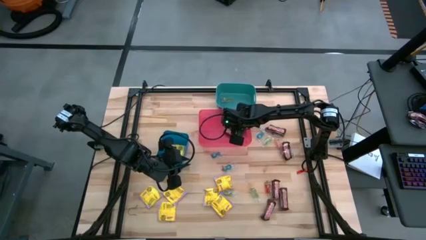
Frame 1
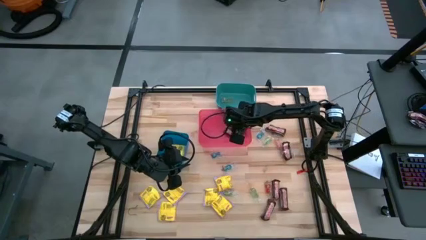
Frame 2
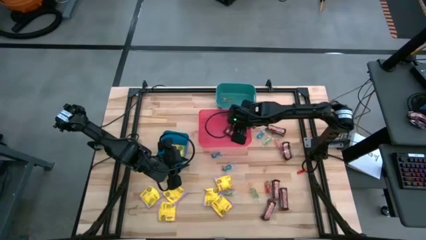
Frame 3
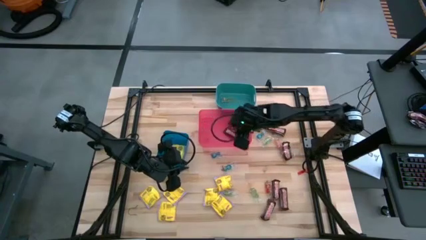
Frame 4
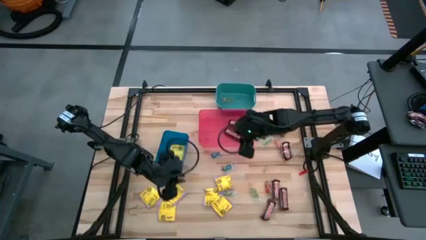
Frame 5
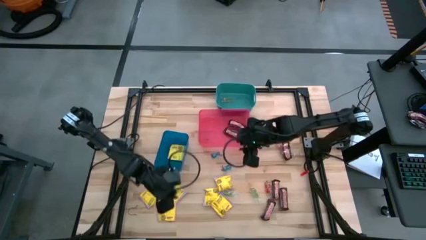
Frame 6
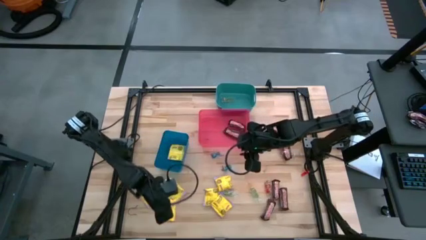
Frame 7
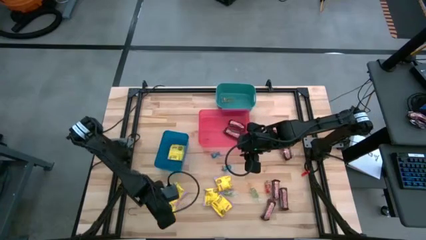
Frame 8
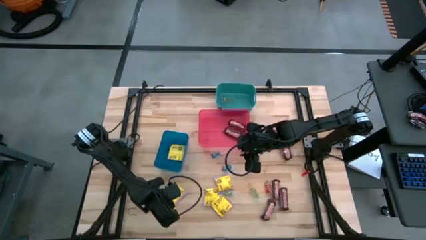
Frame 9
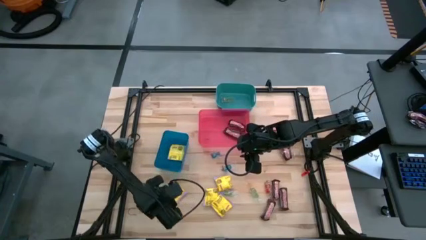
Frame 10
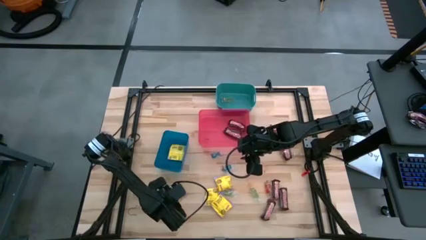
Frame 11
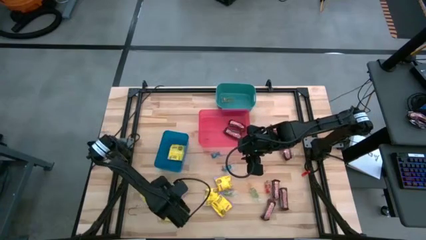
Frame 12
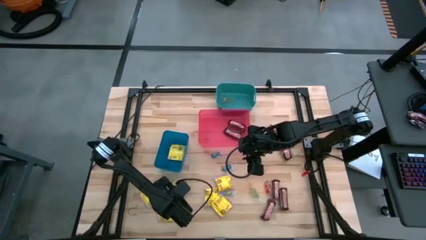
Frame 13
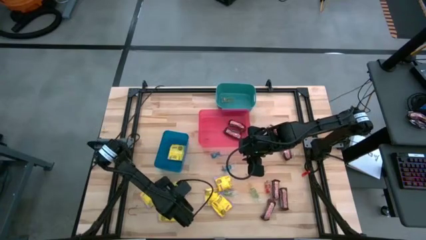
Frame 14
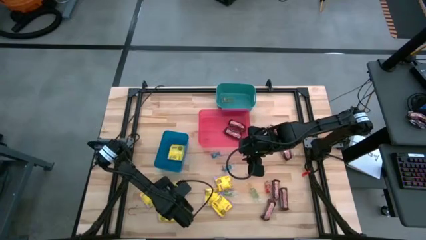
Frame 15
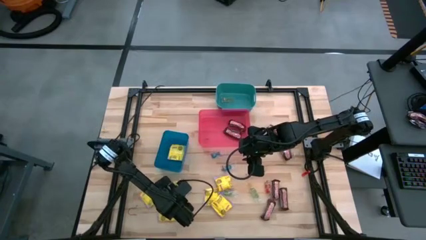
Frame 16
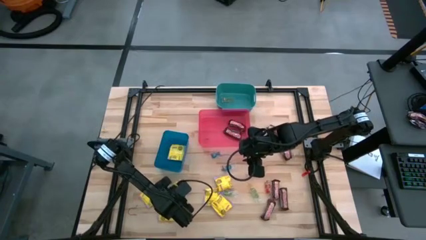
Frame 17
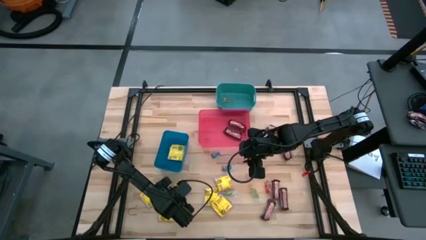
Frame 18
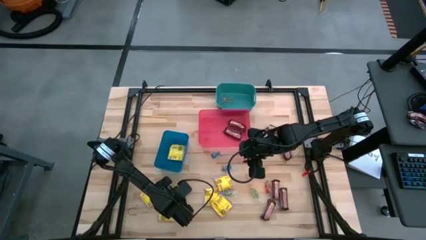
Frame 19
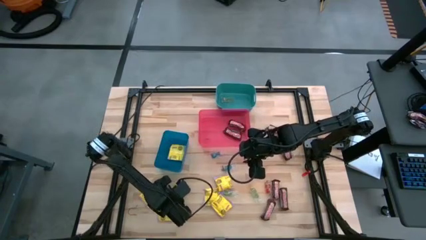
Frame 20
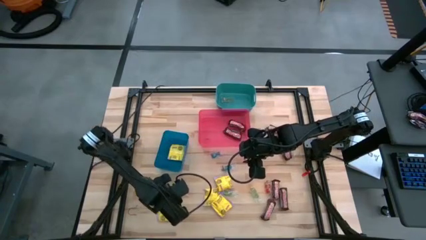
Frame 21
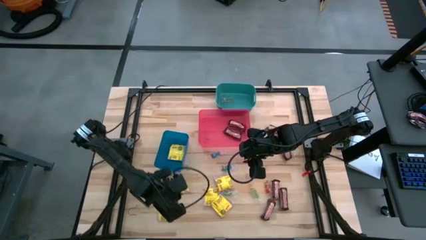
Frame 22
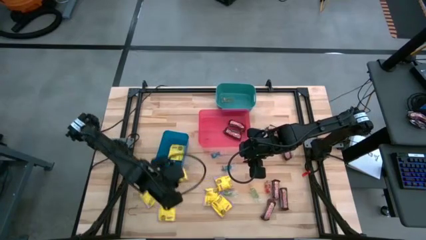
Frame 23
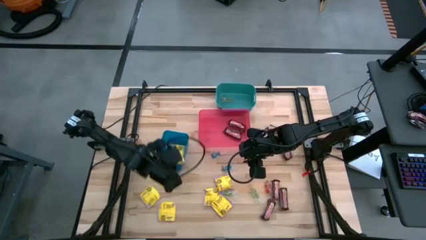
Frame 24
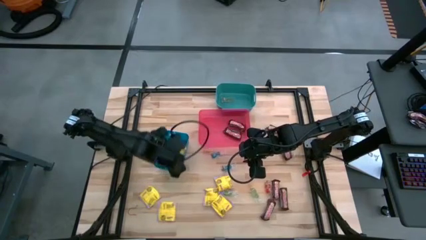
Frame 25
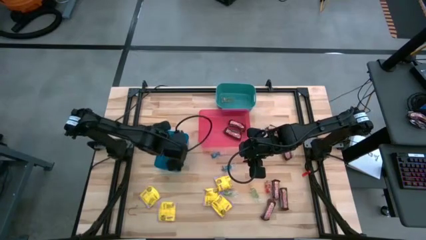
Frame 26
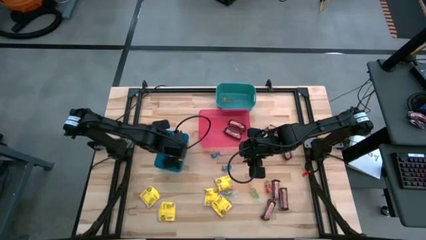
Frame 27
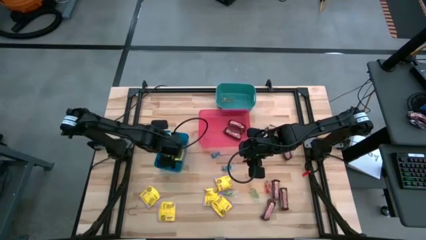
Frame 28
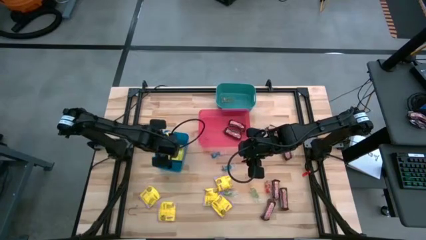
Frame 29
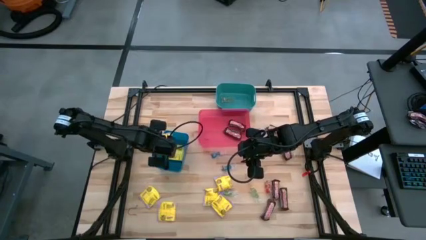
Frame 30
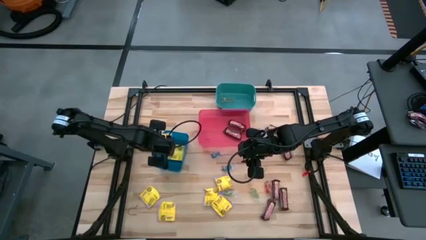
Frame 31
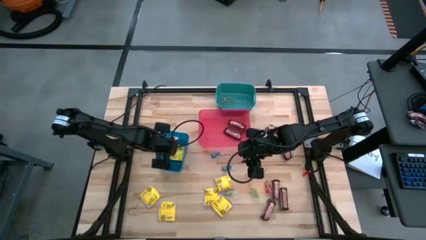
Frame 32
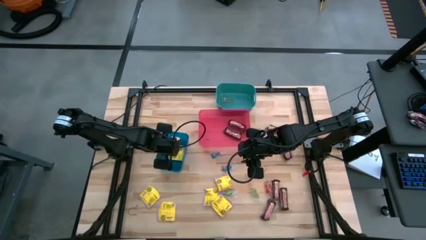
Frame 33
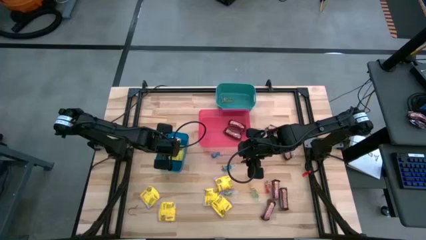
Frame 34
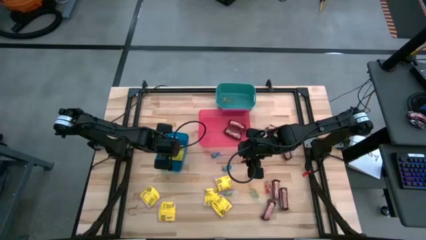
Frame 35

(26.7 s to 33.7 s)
Task: Sort candy
Put the yellow candy into the blue bin

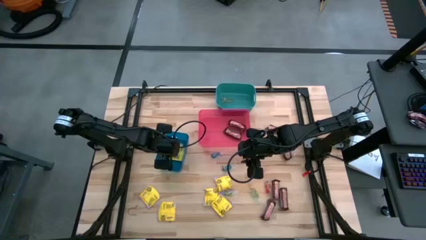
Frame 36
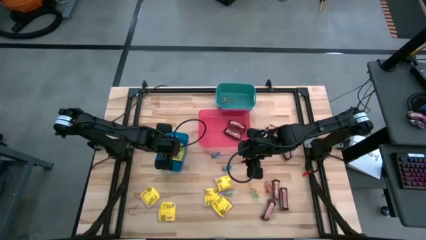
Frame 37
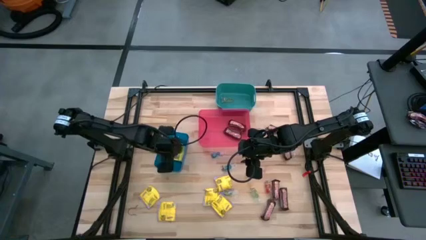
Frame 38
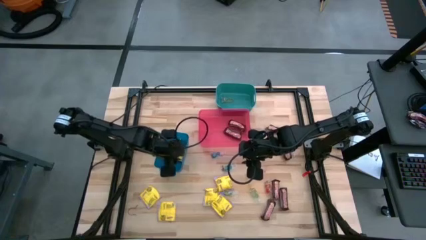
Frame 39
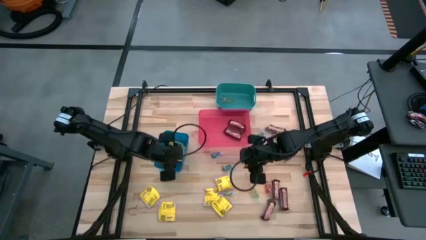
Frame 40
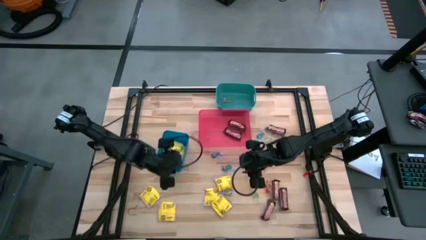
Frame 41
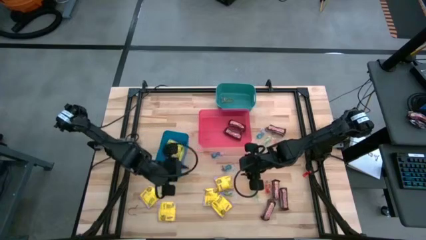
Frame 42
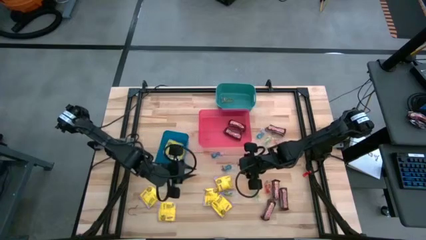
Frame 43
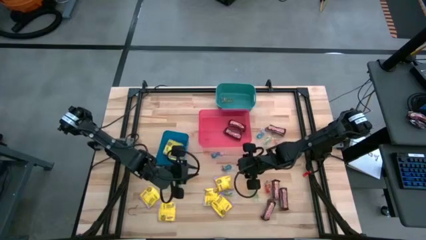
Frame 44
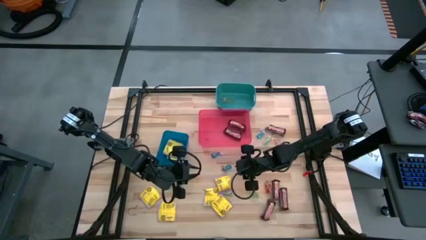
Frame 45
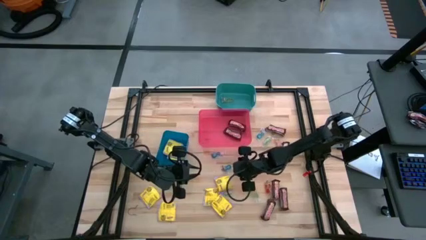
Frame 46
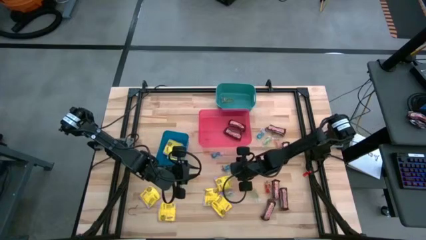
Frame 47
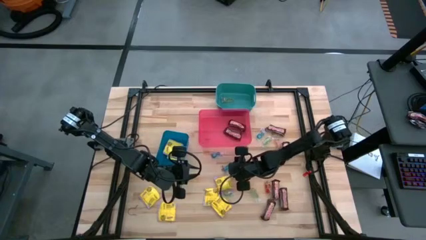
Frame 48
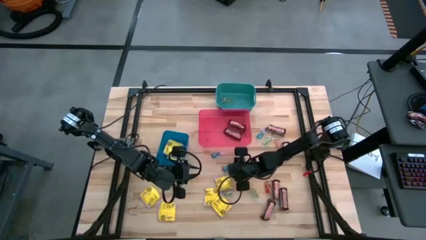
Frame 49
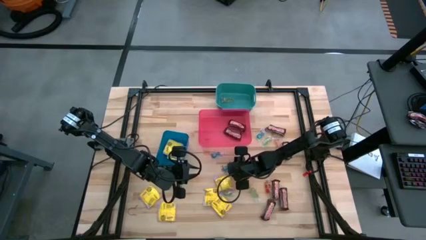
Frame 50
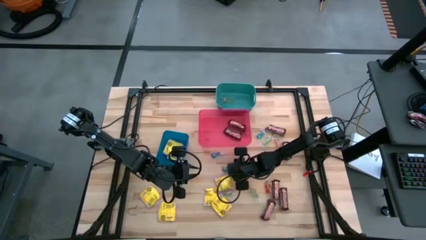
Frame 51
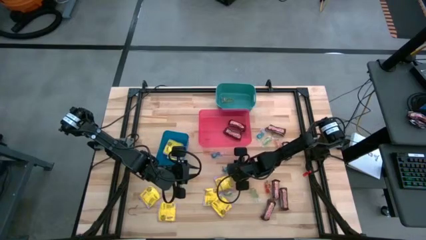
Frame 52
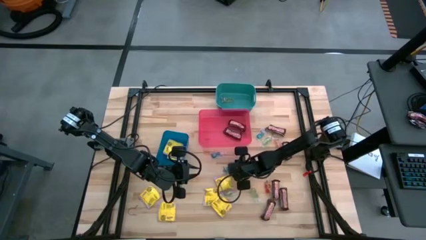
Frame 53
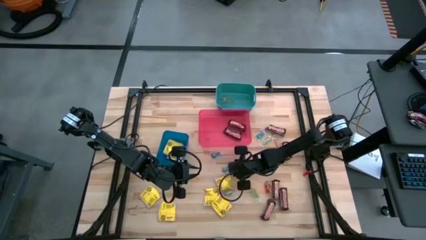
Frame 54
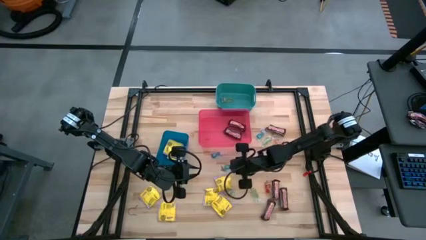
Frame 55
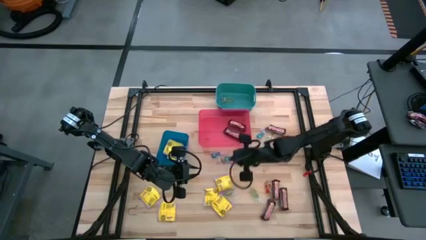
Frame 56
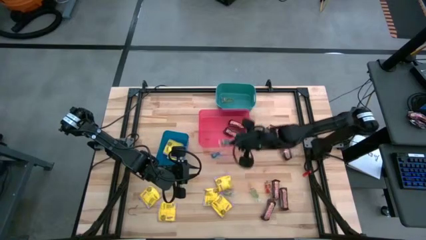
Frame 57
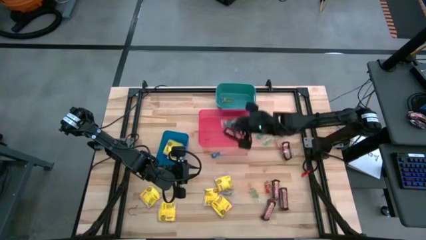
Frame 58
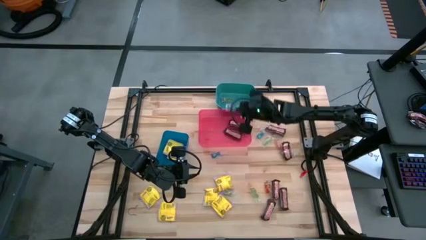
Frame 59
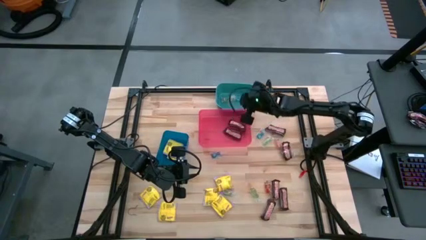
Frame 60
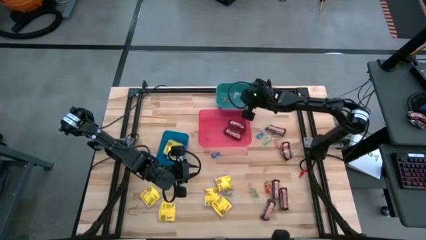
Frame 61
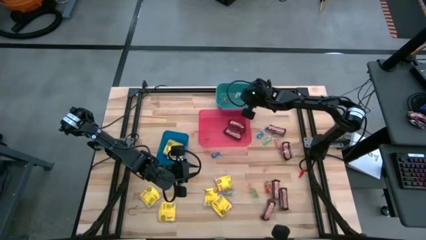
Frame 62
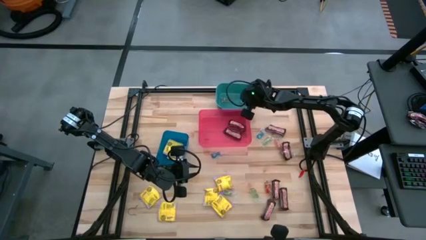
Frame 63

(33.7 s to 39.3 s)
Put the blue gummy into the green bin

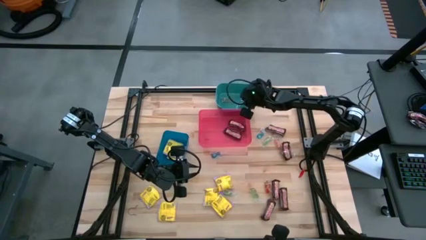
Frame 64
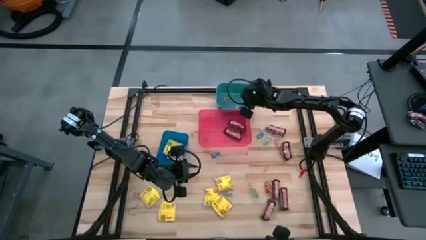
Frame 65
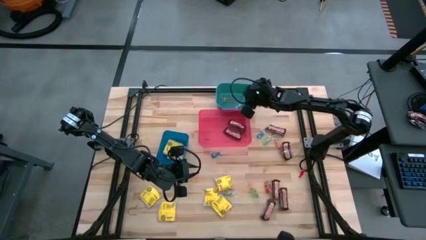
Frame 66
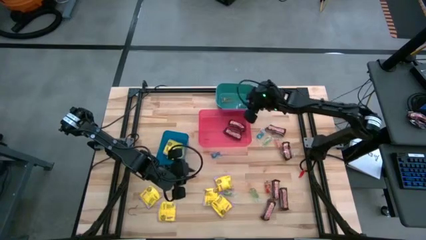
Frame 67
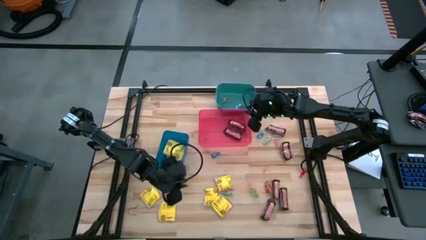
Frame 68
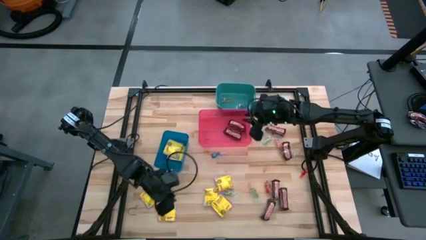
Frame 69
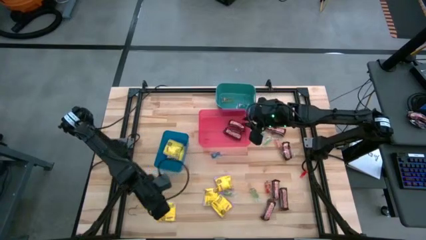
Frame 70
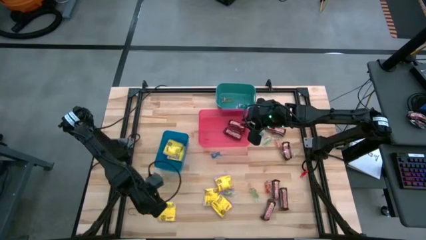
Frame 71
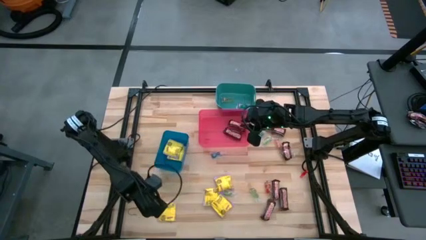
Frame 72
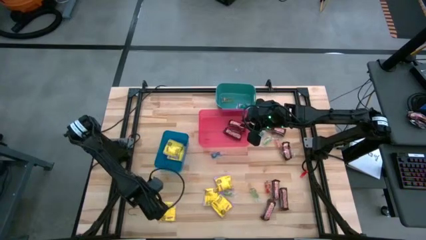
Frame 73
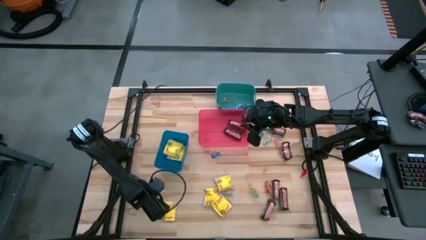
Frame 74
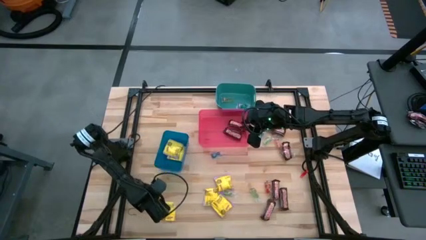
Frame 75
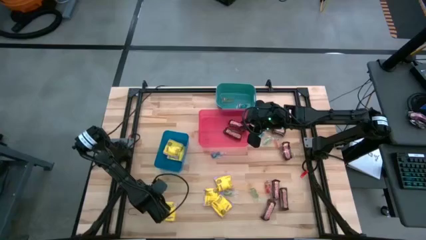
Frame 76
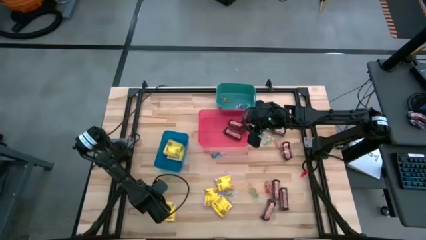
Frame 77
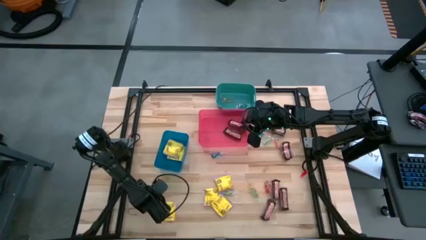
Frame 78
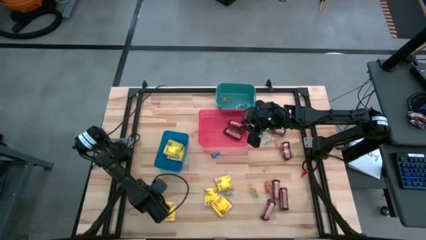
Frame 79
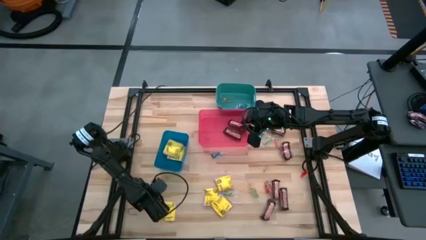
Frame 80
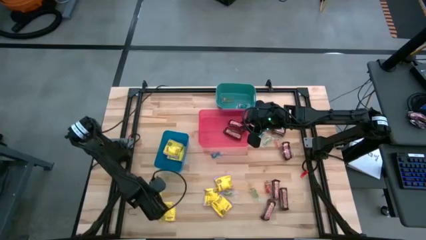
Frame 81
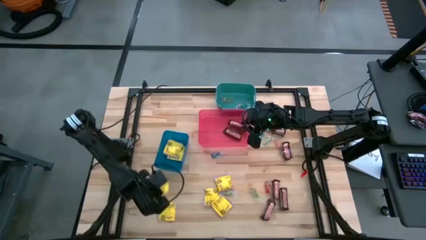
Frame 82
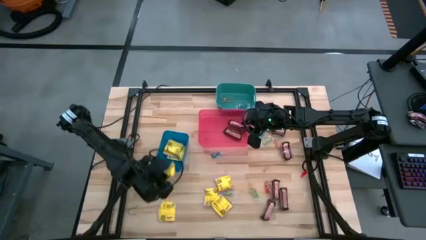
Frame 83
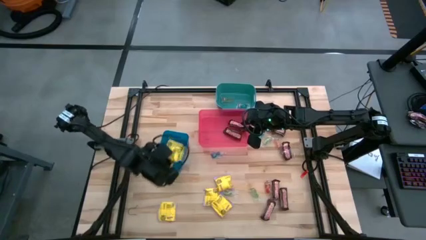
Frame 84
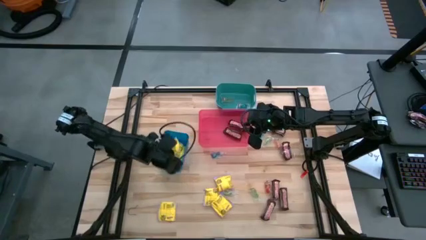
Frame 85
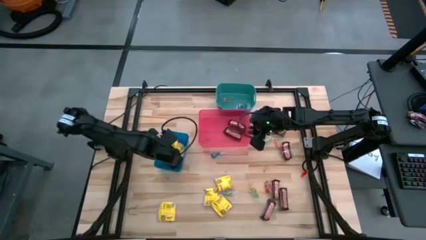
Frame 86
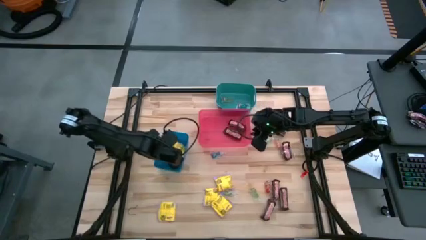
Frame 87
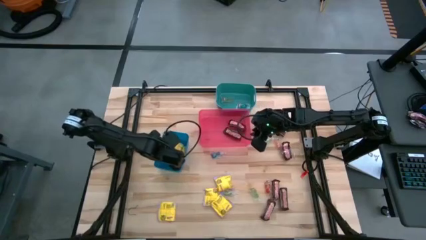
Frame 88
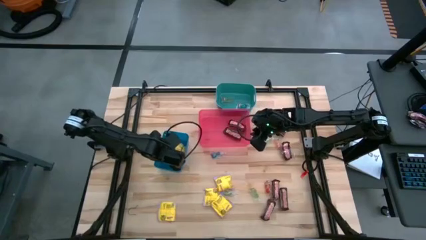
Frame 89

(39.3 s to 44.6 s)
Put the yellow candy into the blue bin
